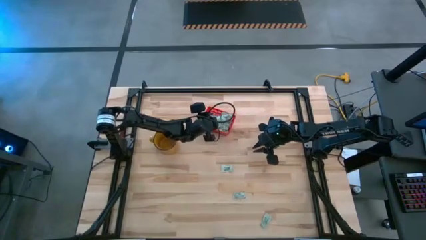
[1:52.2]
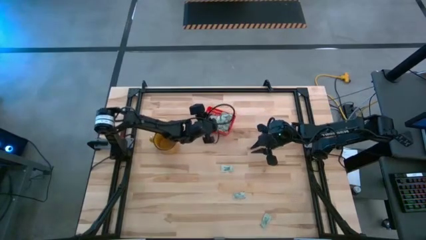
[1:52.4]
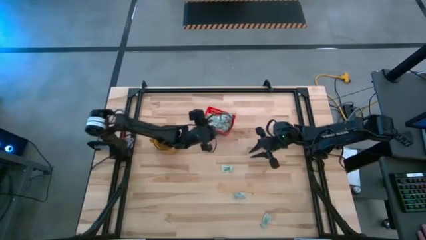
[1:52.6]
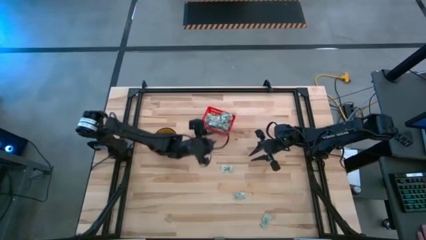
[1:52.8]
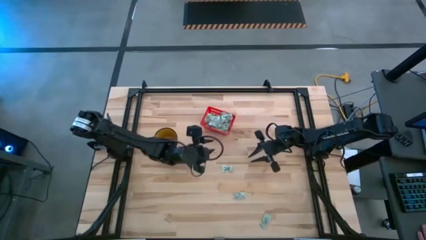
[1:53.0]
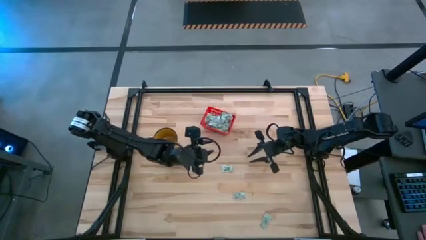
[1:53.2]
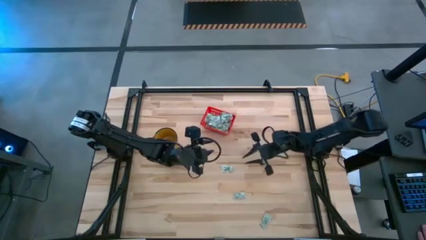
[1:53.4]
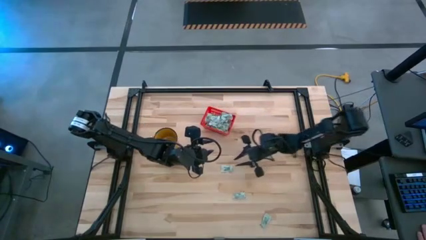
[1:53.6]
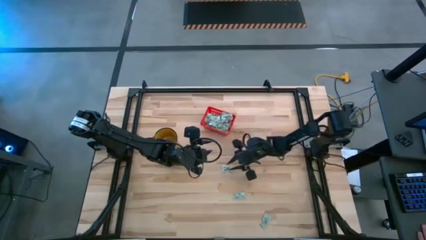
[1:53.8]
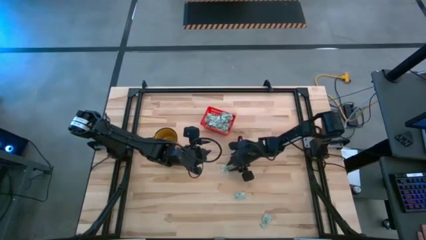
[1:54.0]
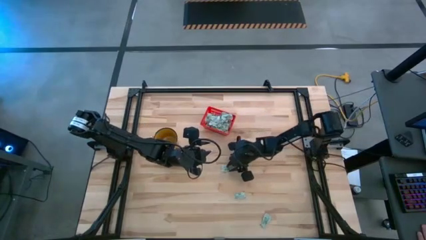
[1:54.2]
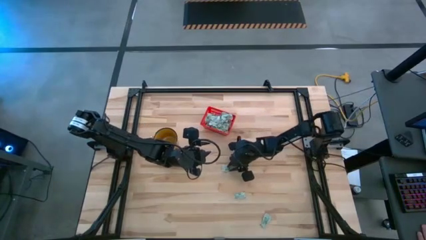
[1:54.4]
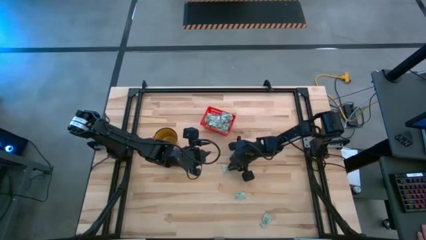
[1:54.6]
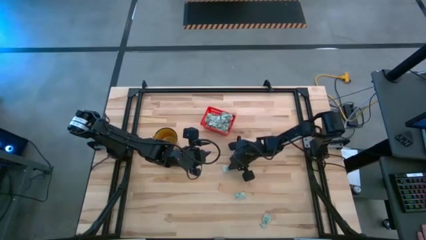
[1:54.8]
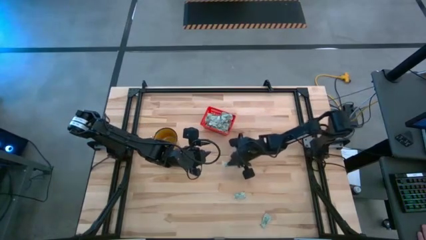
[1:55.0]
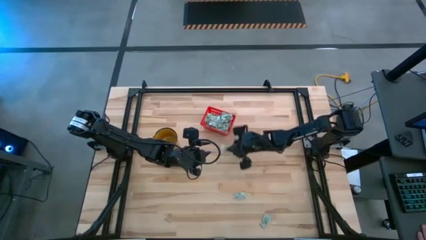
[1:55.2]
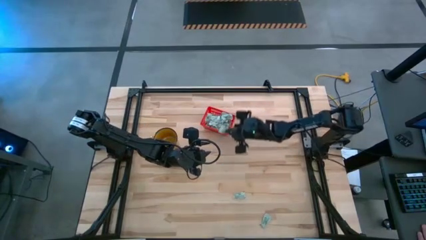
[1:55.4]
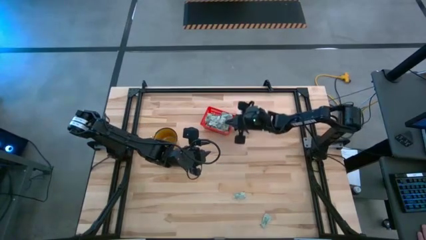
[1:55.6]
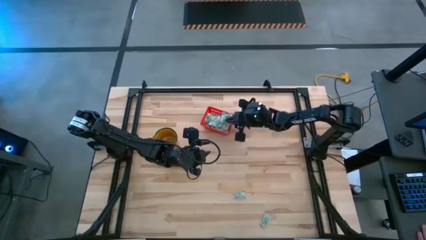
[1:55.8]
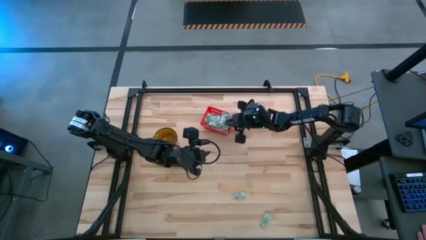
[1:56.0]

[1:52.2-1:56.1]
Task: Pick and place Stevia / Truvia into bins
Put the top stevia packet into the red basket

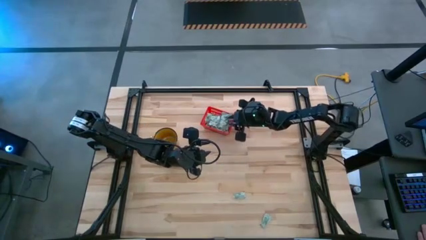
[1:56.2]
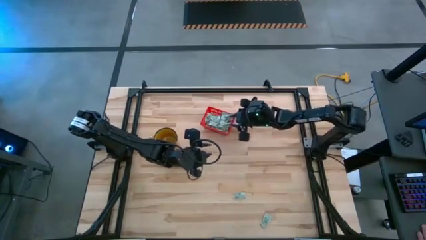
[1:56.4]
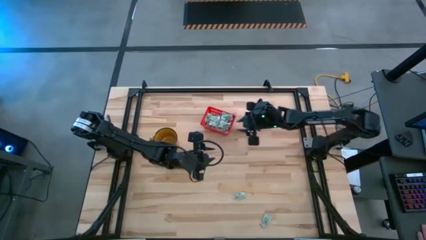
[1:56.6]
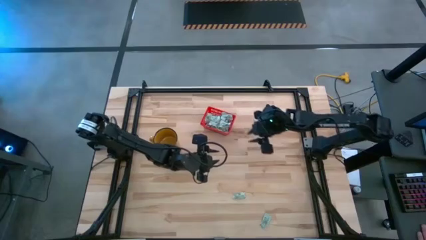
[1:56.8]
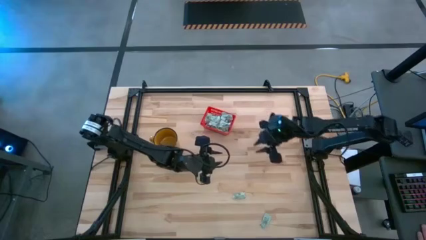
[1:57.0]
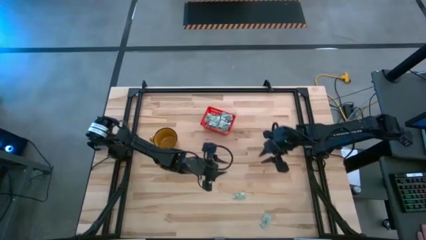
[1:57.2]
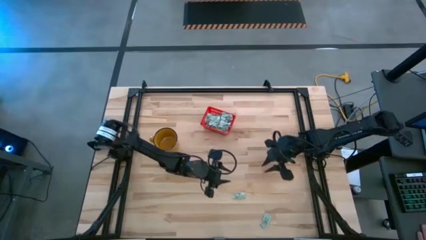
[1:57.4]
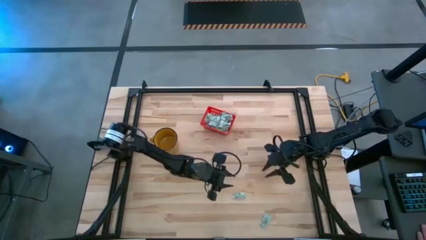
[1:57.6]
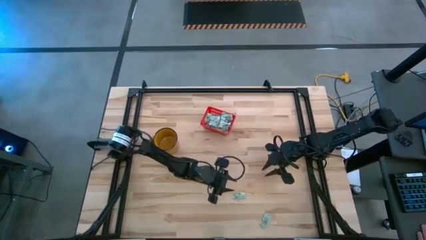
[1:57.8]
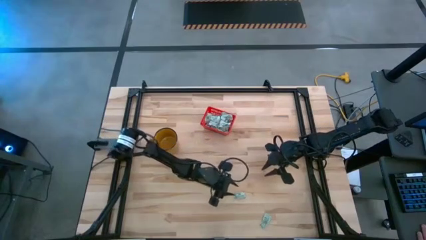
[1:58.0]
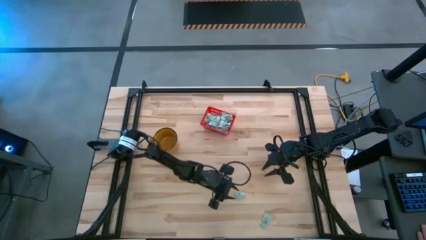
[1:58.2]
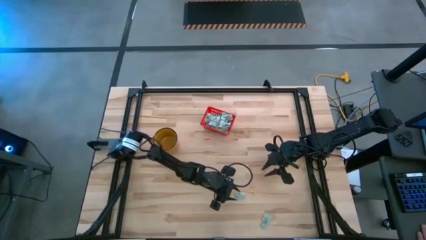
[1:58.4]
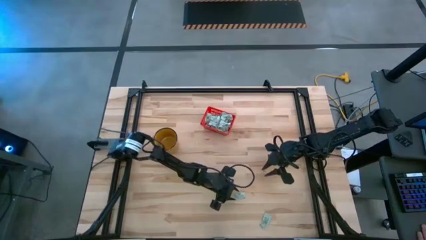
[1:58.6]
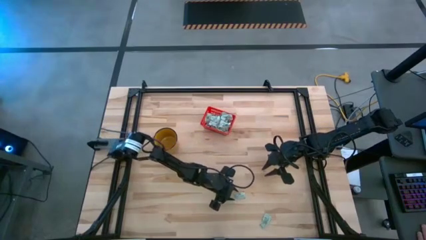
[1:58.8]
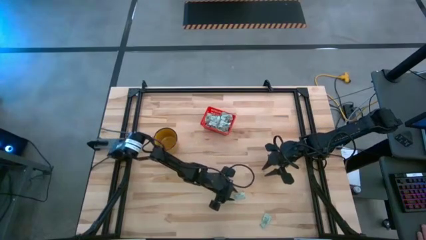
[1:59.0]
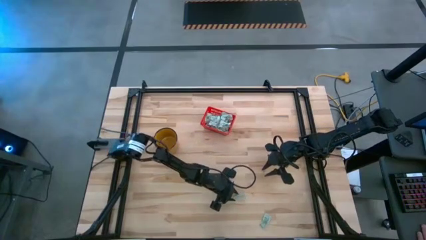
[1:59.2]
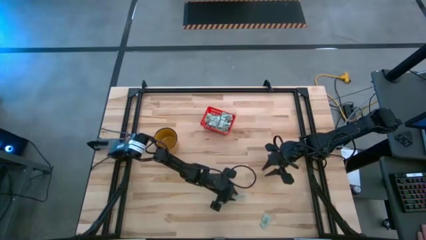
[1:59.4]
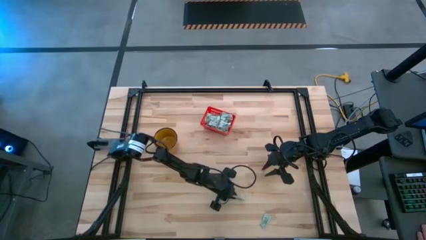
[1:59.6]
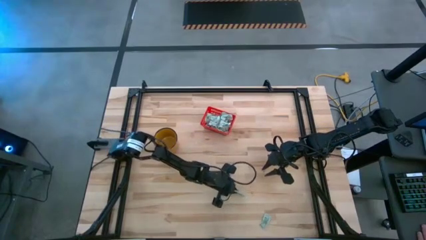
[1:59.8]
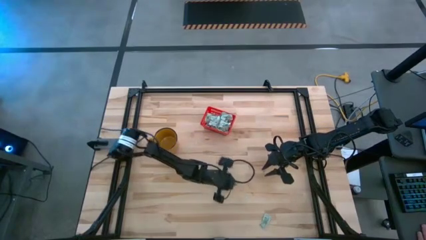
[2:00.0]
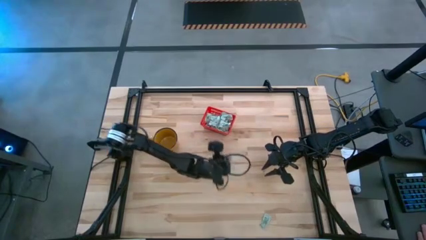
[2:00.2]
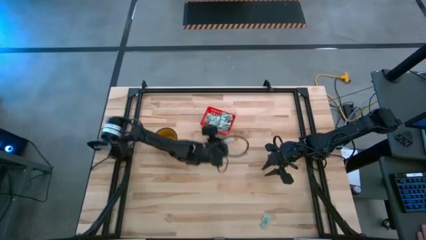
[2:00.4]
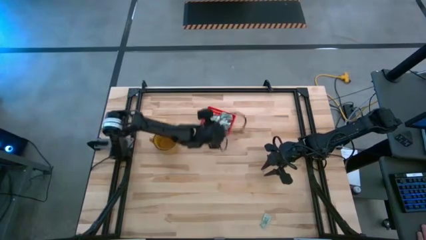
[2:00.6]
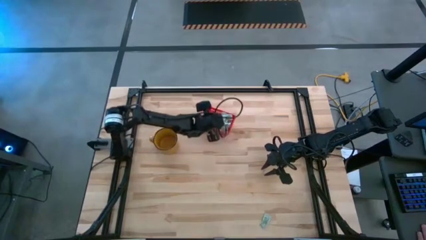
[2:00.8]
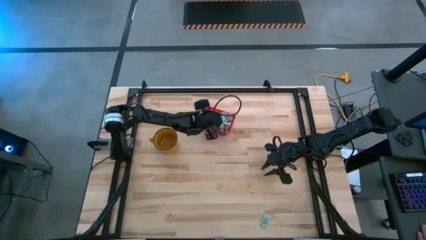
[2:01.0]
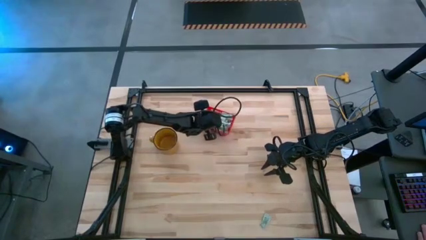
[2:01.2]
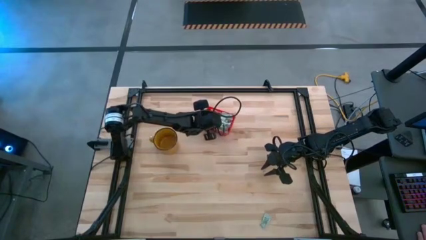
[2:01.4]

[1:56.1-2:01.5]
Put the top stevia packet into the red basket

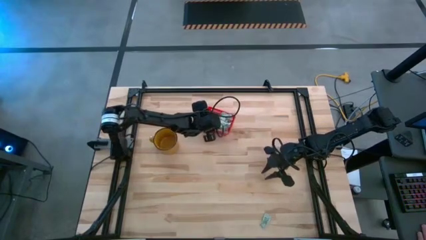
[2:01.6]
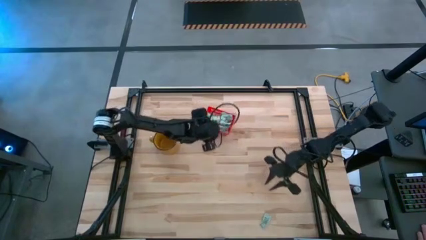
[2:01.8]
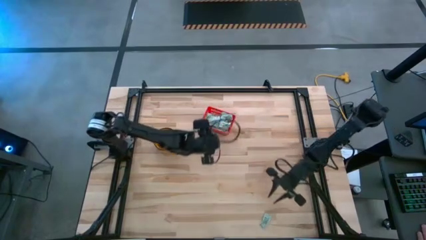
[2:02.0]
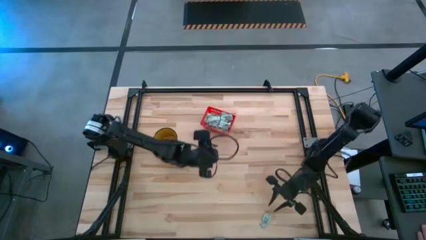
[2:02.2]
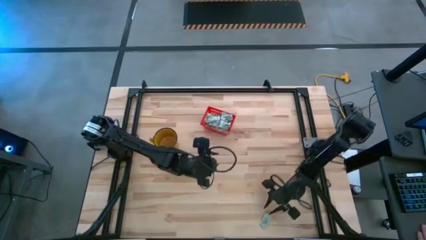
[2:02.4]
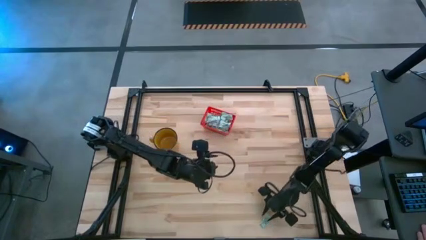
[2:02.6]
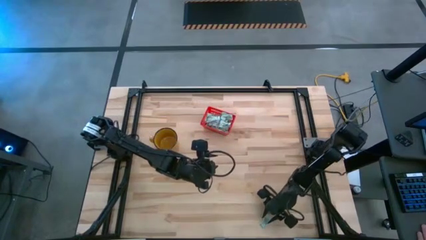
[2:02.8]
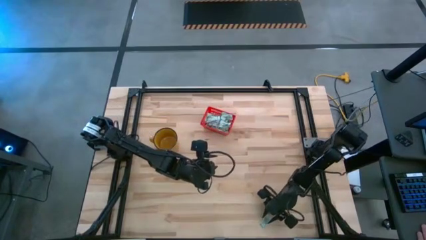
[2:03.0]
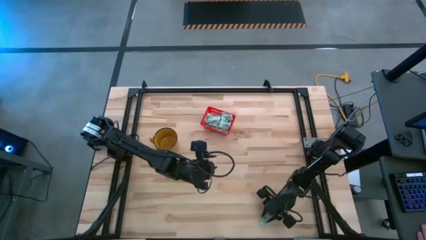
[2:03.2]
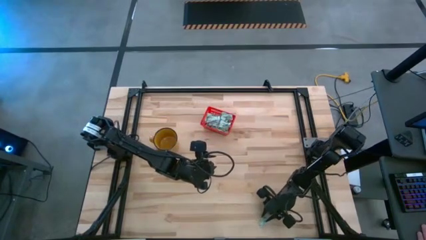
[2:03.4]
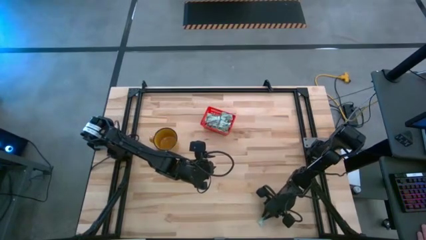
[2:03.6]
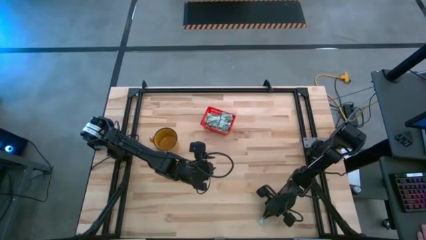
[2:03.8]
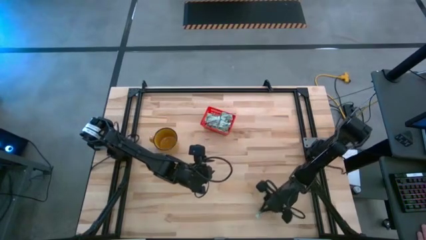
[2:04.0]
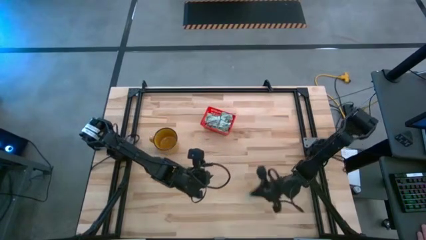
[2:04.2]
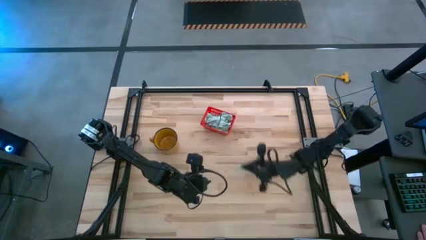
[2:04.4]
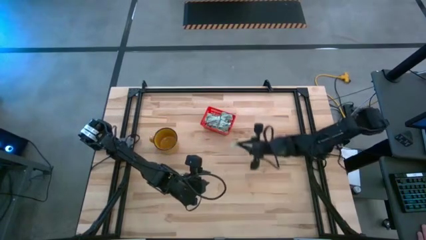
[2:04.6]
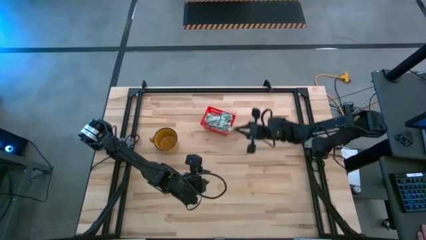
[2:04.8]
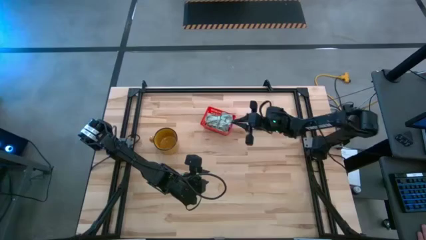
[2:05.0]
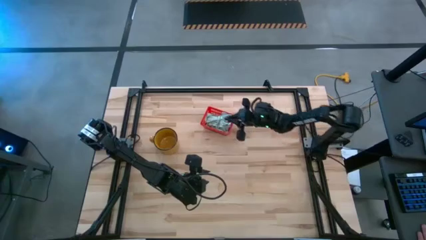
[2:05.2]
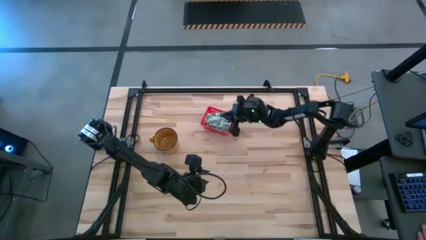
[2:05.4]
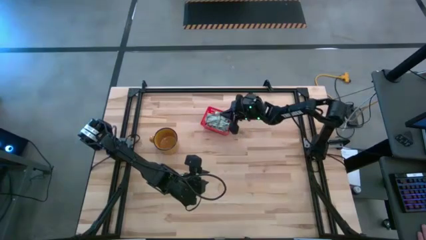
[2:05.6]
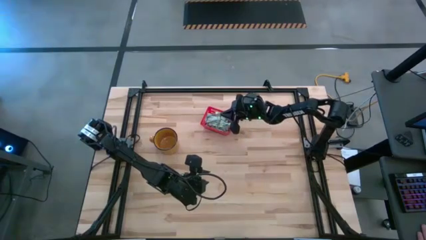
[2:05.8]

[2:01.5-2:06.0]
Put the stevia packet into the red basket

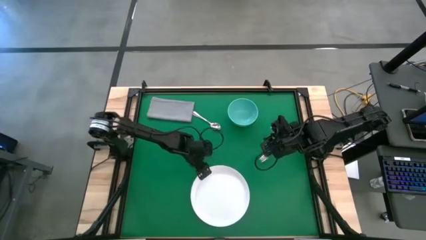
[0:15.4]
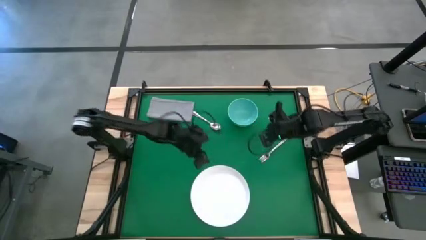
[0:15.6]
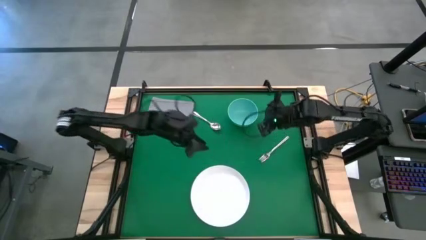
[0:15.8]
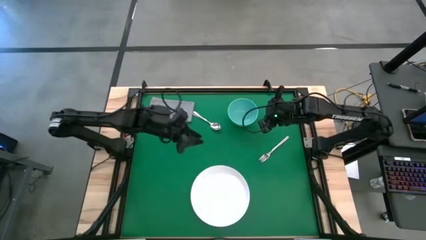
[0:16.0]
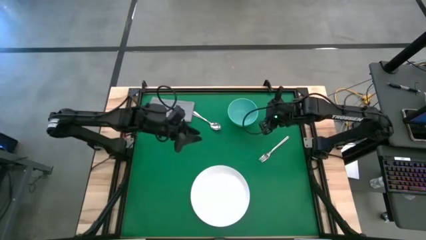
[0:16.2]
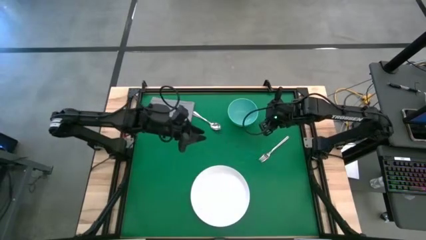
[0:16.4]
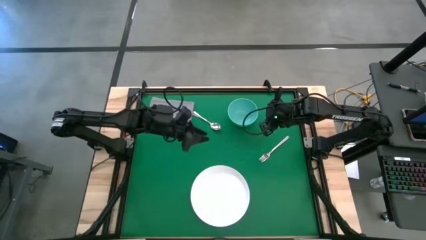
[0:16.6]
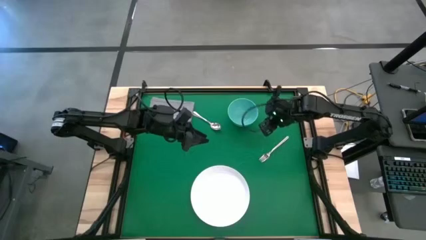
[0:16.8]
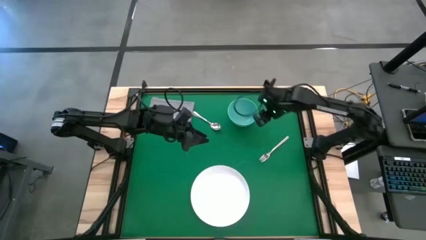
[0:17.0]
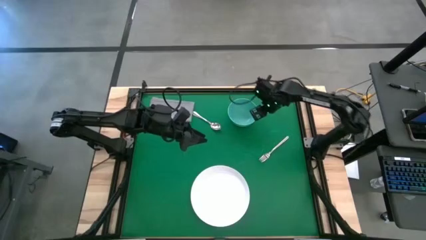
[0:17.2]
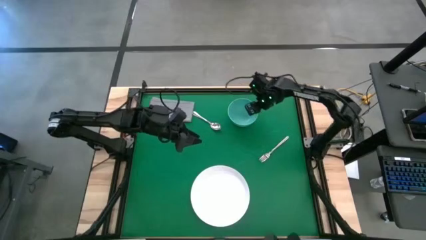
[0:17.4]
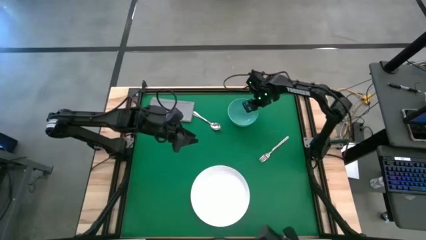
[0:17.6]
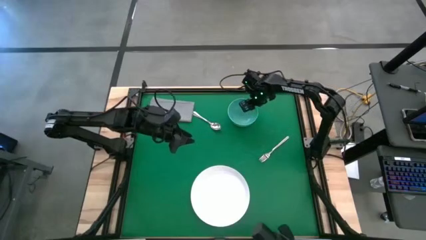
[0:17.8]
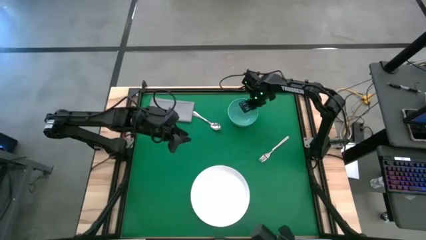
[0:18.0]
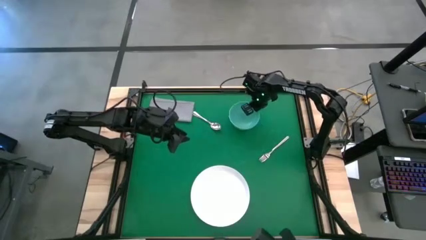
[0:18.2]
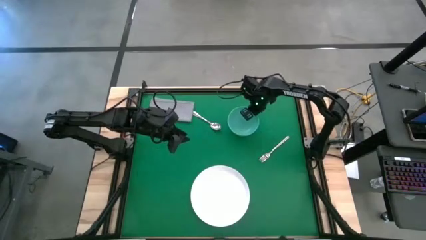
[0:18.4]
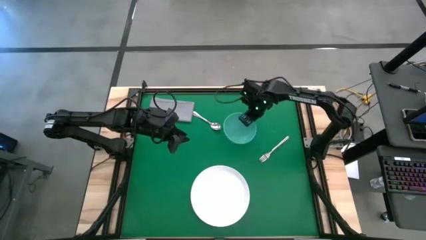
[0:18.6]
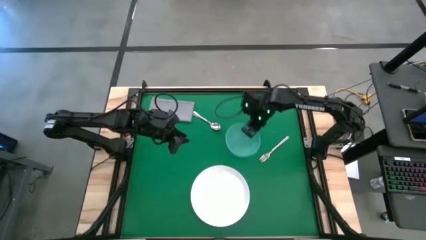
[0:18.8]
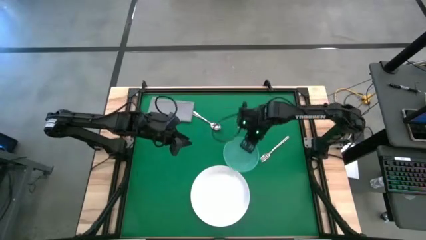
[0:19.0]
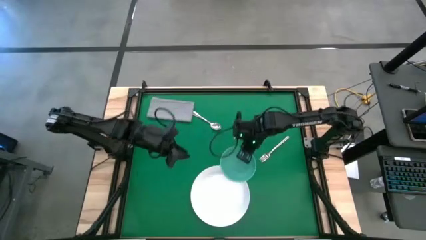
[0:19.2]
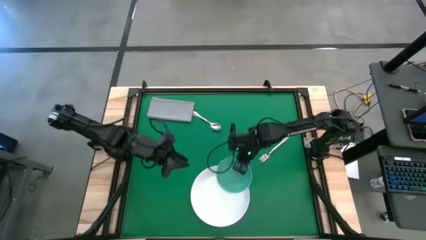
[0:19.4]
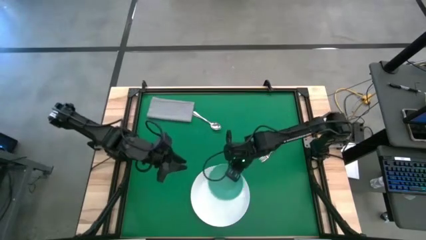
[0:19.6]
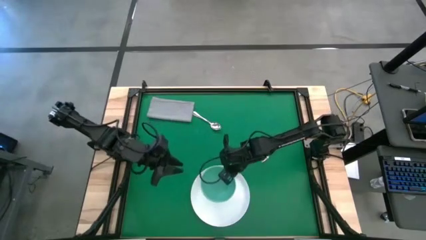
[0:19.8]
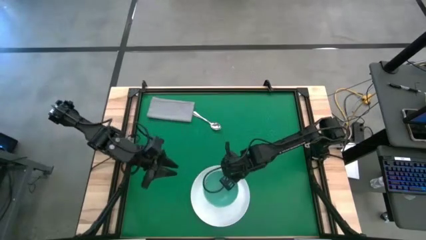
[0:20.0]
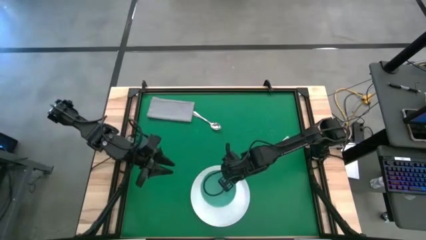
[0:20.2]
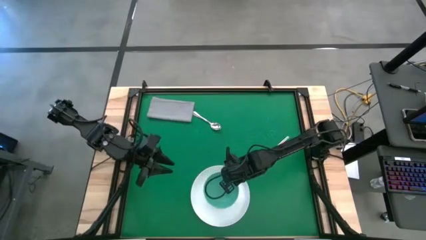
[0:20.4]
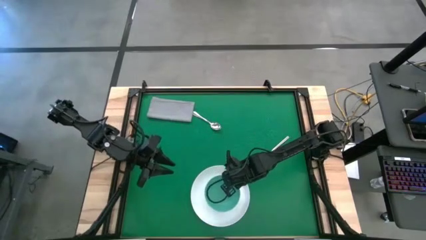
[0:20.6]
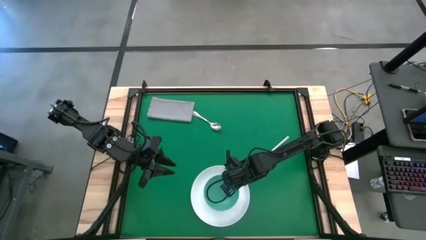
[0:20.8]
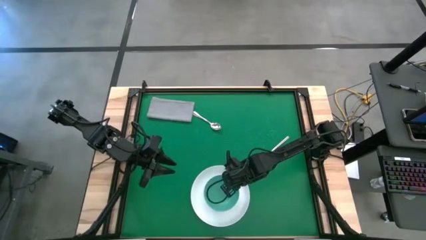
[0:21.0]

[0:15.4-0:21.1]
Task: Pick and place plate/cup/fork/spoon on tray
Put the green bowl on the white plate
